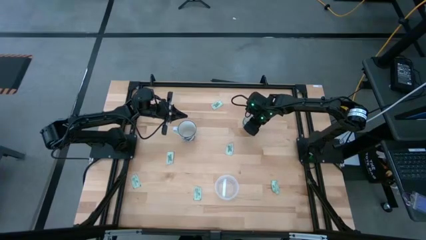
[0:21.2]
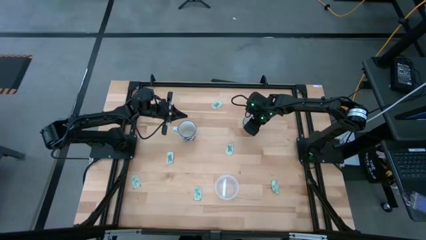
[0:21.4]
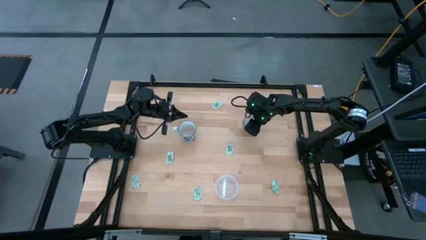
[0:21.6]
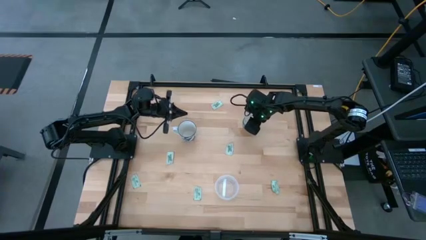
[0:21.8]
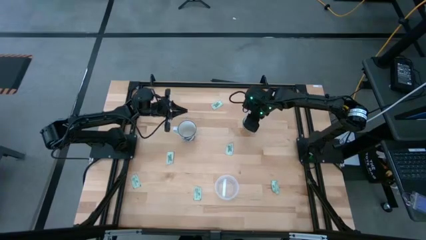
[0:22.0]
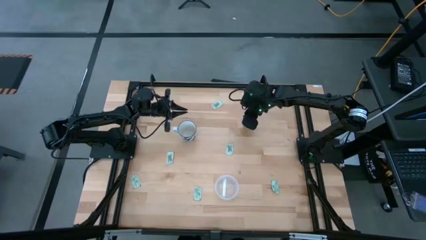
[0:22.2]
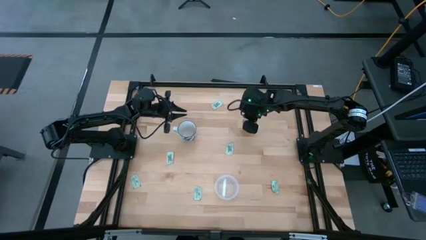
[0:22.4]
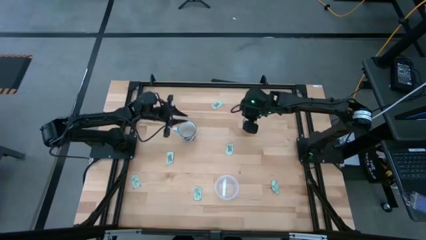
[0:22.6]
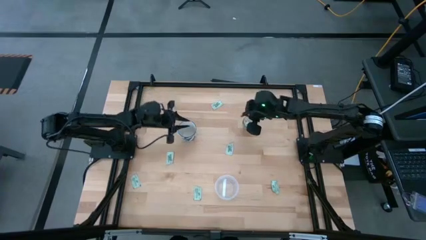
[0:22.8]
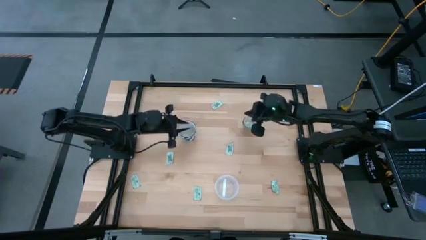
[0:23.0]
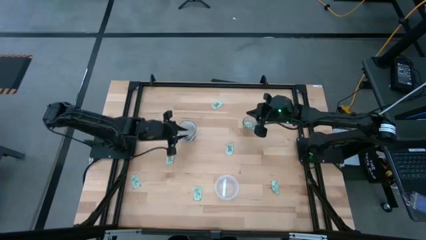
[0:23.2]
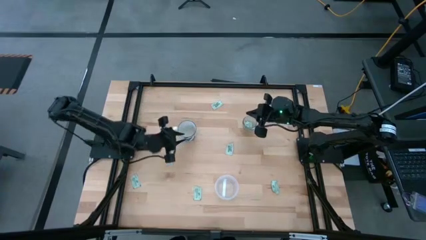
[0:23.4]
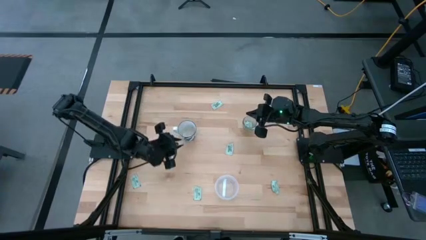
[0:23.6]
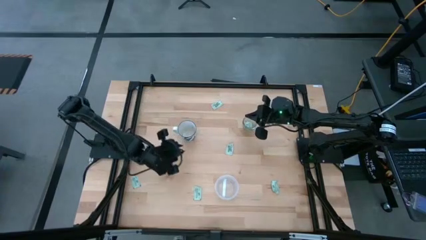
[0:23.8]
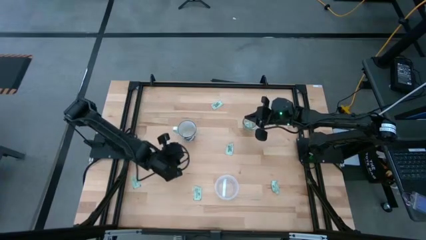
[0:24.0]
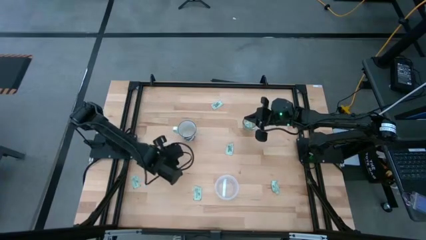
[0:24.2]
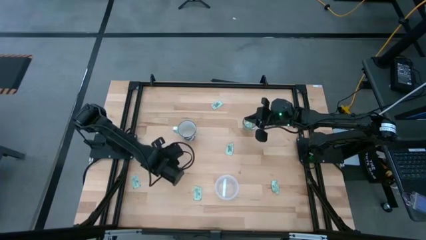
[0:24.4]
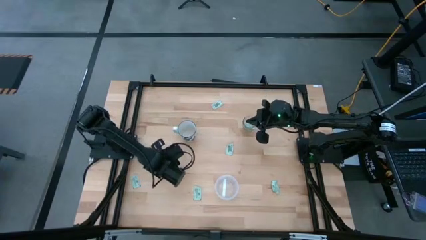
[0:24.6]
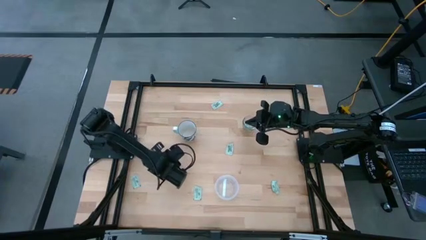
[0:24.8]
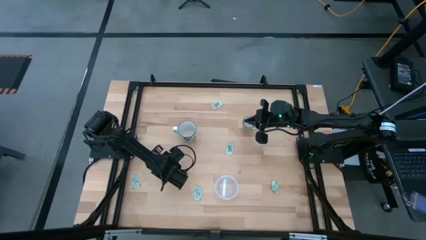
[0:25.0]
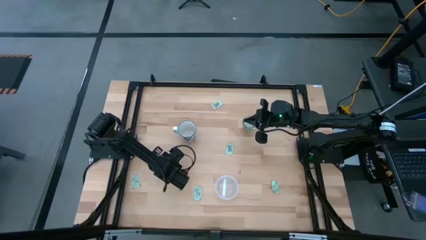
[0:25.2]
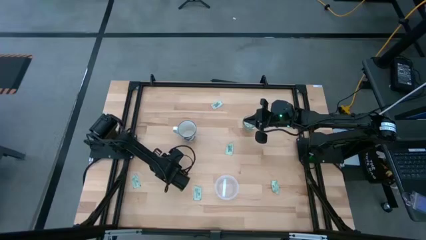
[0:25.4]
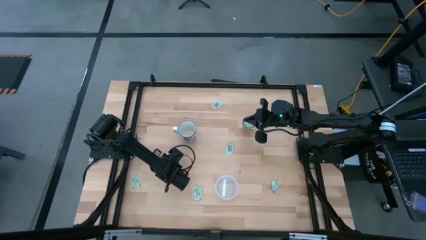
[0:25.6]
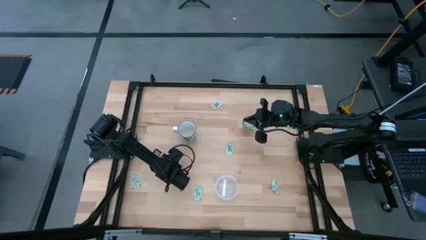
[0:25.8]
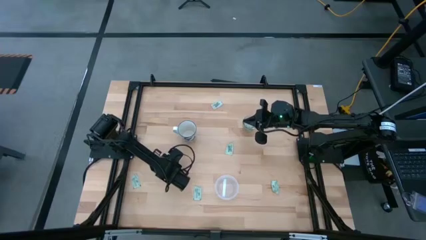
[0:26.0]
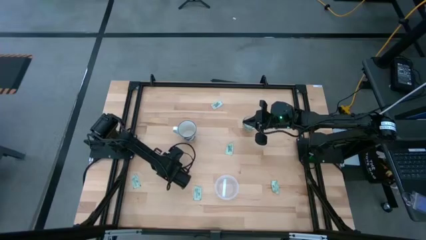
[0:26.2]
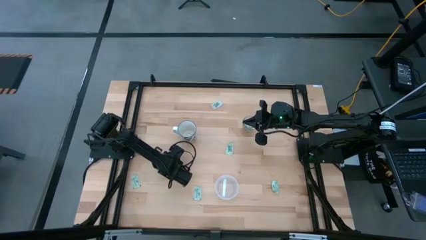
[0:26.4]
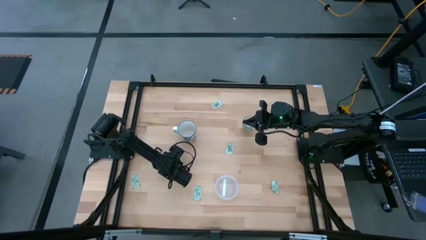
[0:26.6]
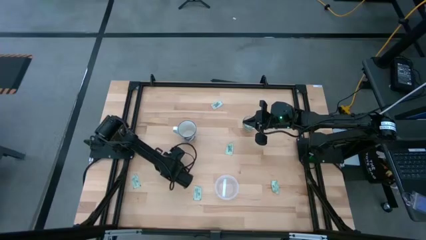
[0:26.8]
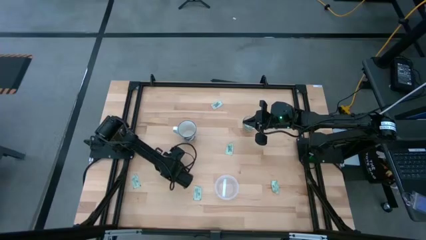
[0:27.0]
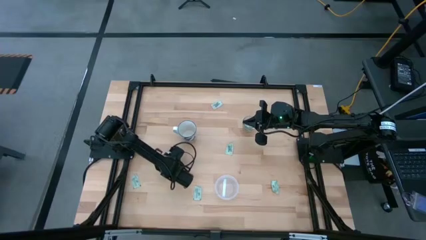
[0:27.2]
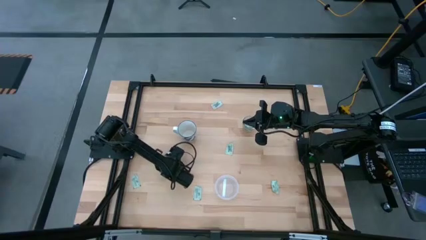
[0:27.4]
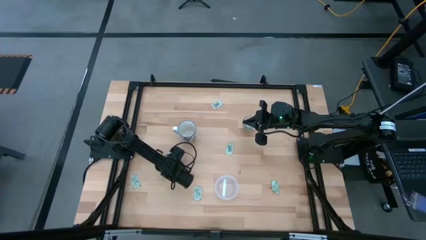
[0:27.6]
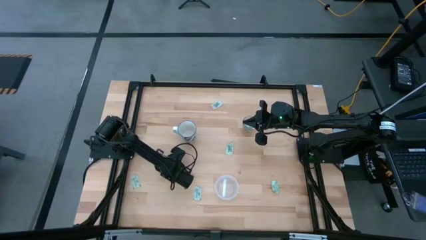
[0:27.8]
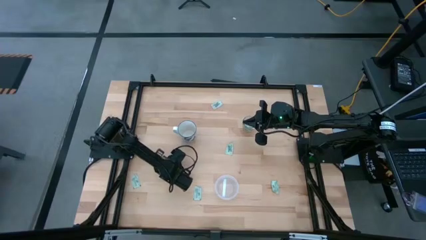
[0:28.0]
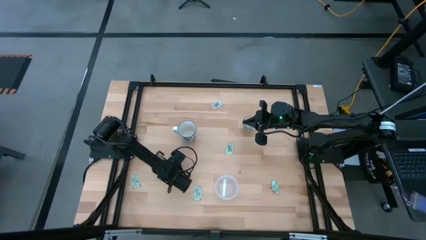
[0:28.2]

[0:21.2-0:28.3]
Task: Pick and place Stevia / Truvia into bins
Put the white stevia packet into the transparent container

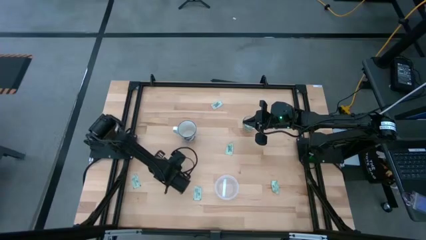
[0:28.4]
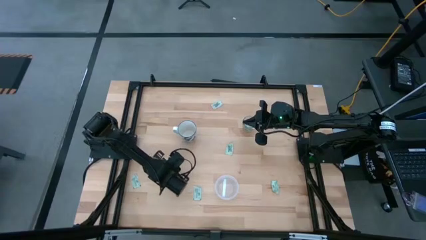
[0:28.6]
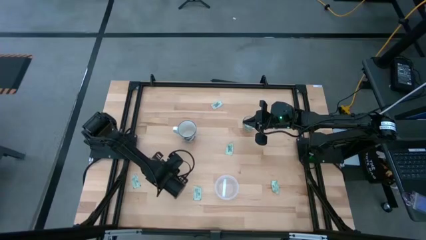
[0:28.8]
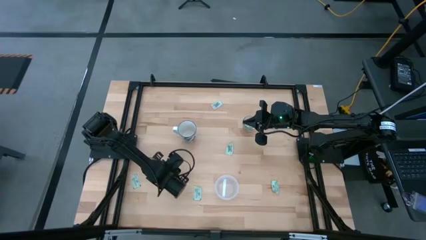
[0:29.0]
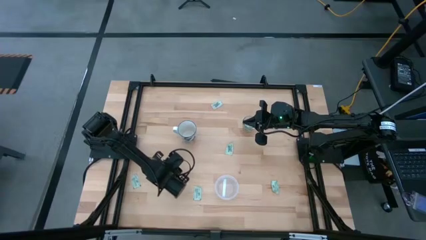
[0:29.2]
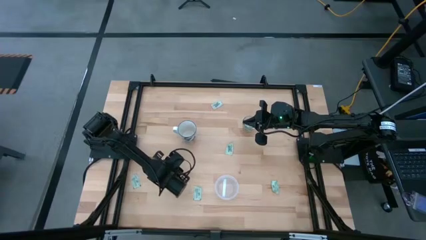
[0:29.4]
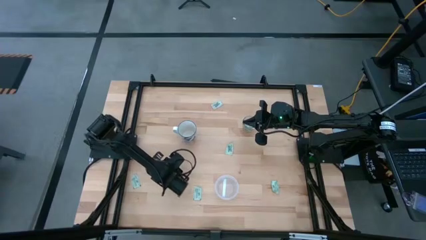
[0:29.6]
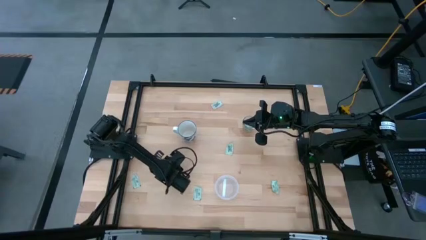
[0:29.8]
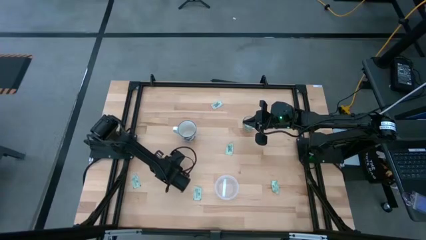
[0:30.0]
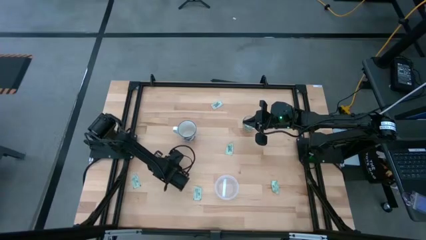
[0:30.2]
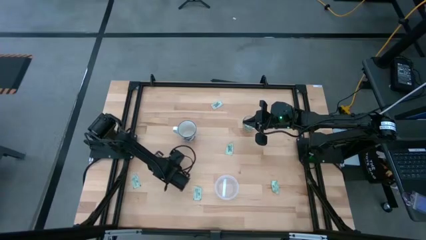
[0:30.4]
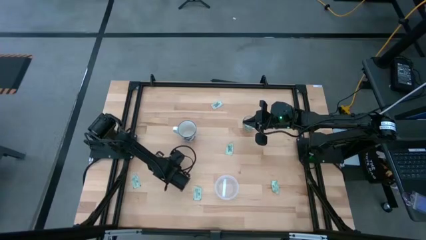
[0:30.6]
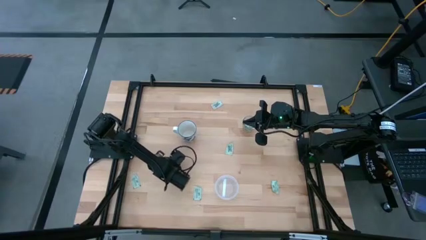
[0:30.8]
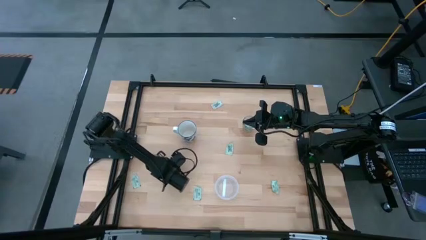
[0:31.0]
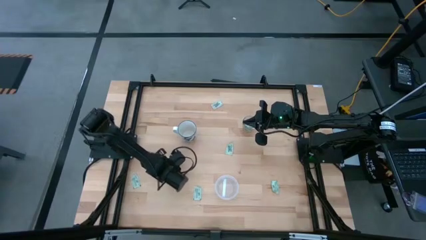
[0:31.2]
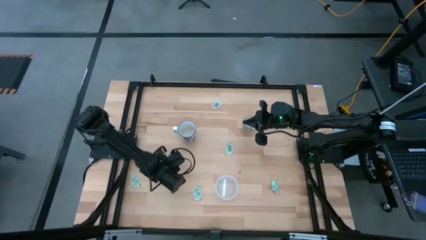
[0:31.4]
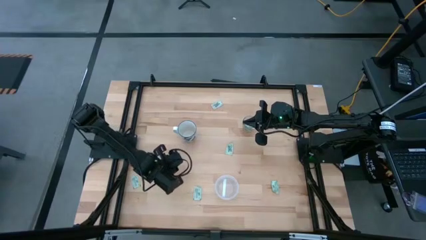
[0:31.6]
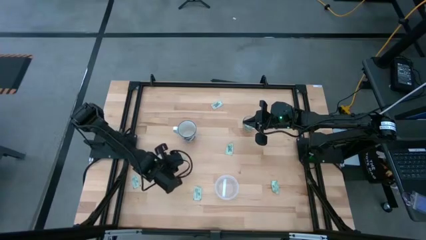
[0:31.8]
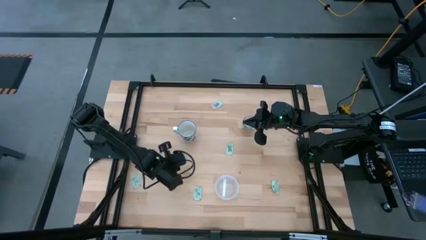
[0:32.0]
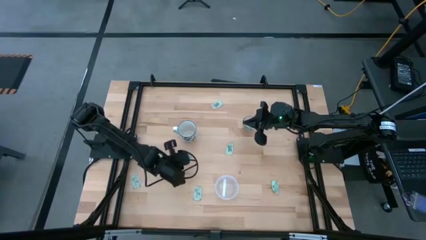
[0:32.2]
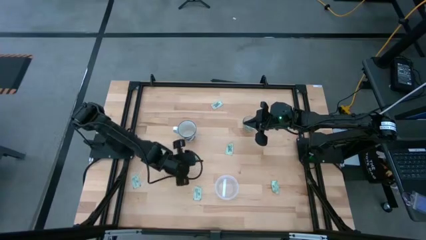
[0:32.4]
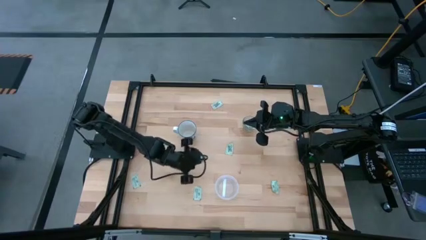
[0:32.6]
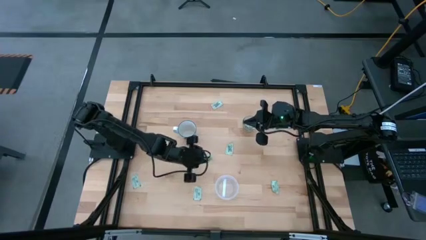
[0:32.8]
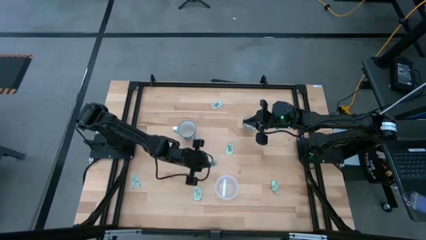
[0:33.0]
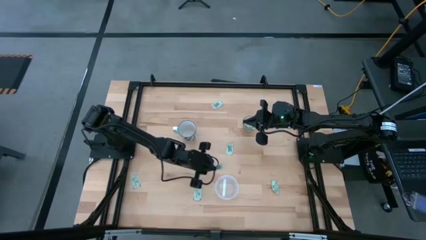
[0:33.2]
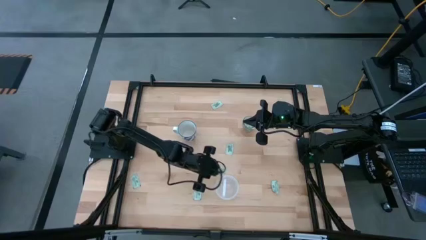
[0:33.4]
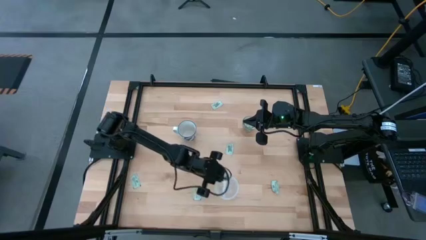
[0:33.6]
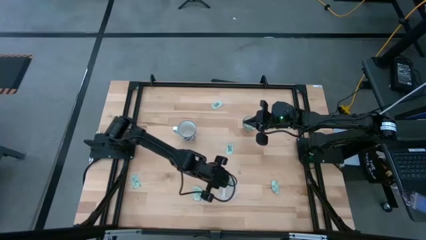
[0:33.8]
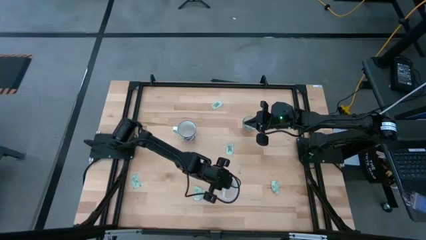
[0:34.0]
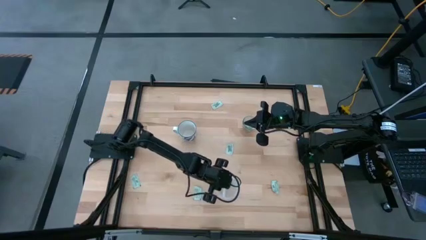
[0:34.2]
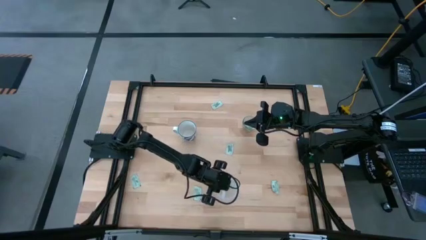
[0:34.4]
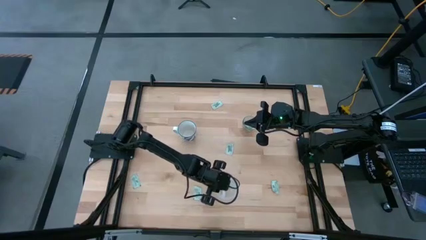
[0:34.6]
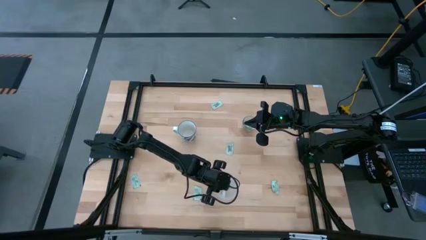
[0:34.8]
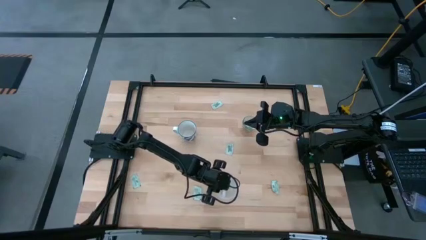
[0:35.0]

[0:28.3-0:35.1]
Put the white stevia packet into the transparent container
